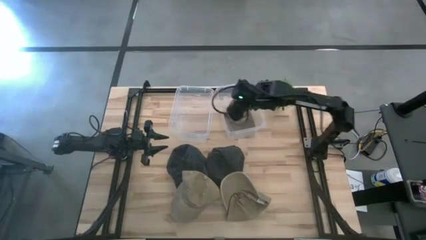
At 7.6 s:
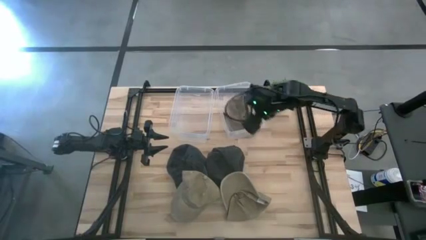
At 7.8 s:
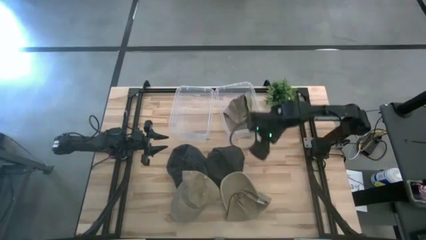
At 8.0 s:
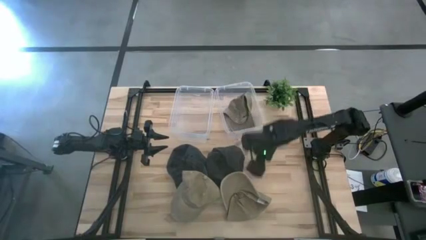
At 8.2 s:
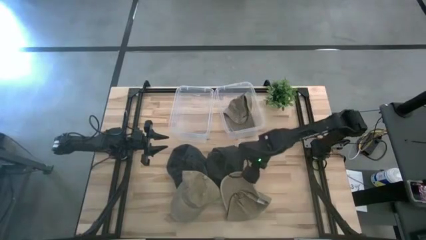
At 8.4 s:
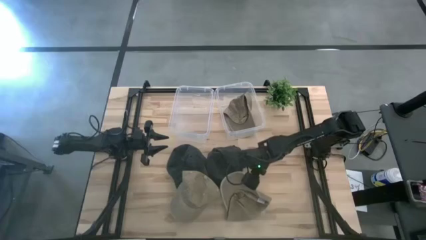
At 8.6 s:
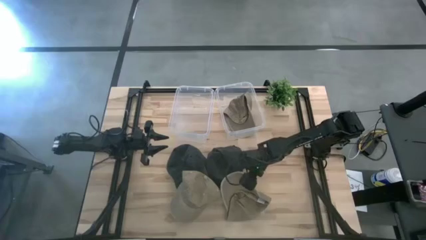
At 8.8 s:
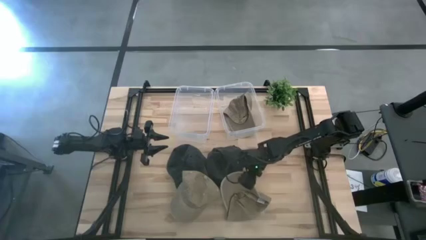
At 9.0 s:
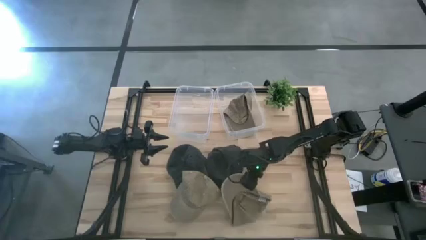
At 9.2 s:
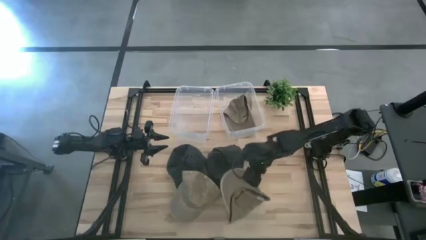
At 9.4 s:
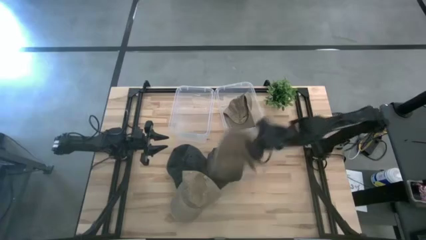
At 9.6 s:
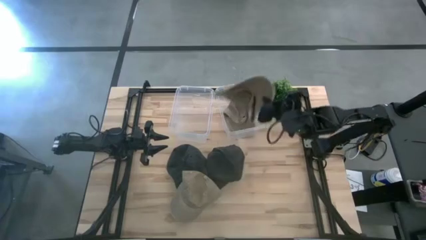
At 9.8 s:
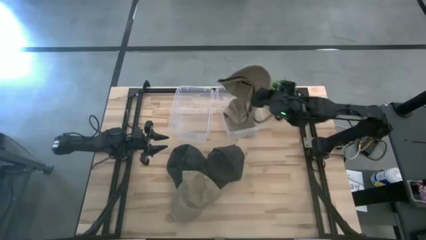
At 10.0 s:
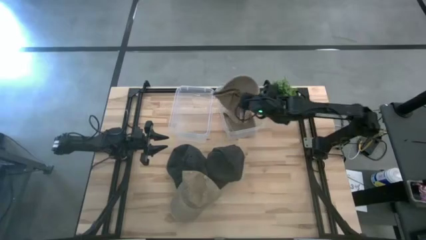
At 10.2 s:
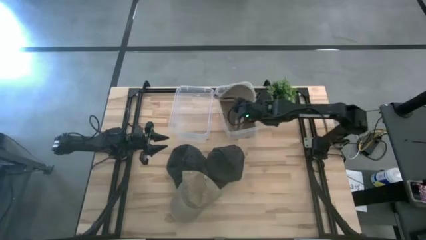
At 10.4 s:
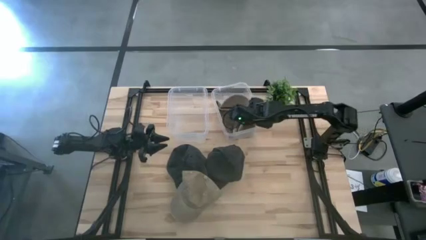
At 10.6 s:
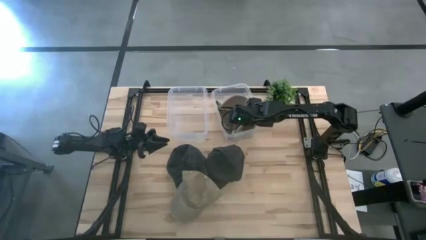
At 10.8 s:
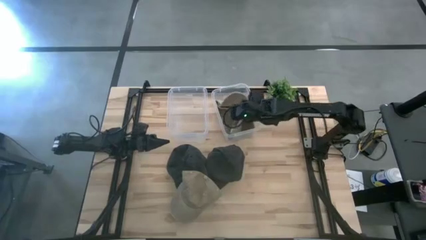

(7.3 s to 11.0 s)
Task: Pick & Place hat
Put the right brown cap into the right transparent bin

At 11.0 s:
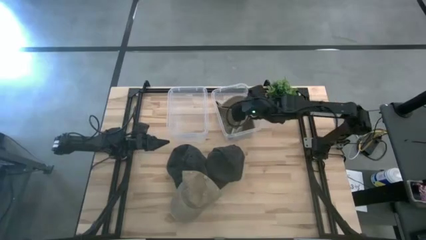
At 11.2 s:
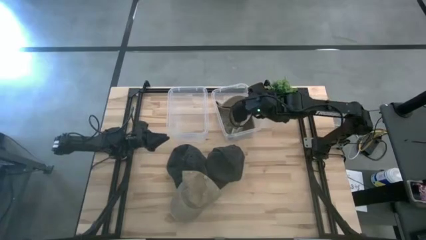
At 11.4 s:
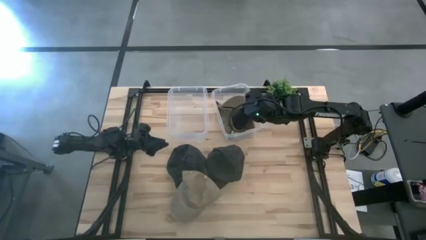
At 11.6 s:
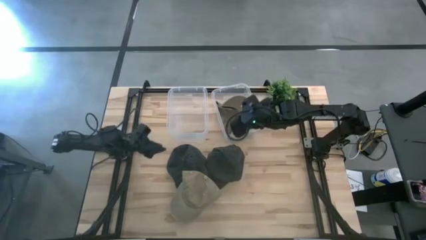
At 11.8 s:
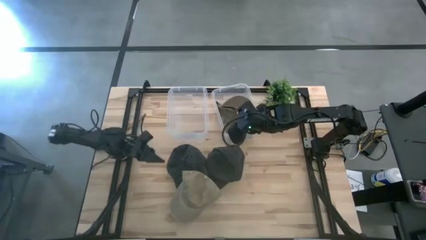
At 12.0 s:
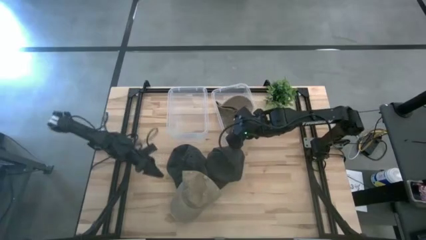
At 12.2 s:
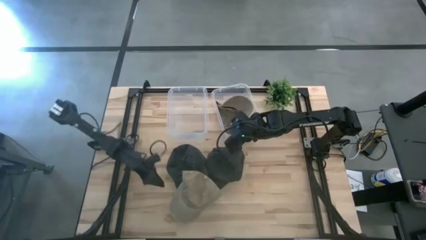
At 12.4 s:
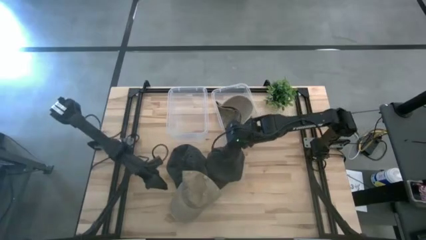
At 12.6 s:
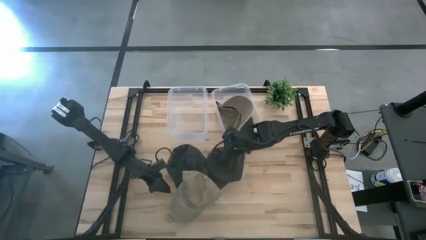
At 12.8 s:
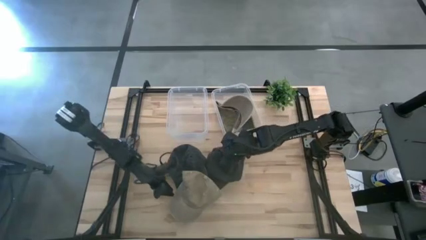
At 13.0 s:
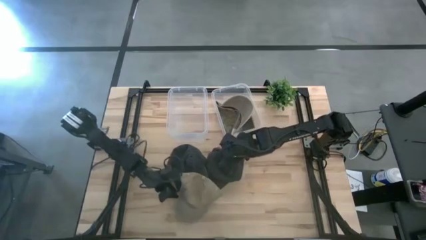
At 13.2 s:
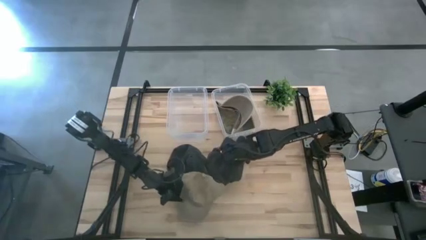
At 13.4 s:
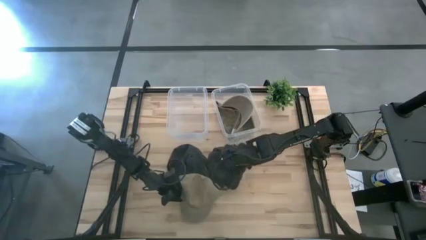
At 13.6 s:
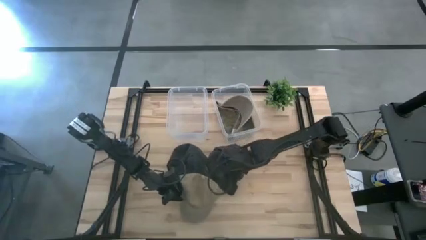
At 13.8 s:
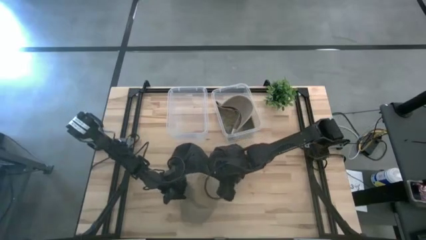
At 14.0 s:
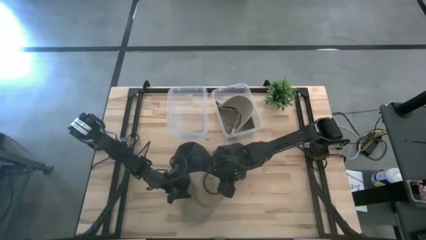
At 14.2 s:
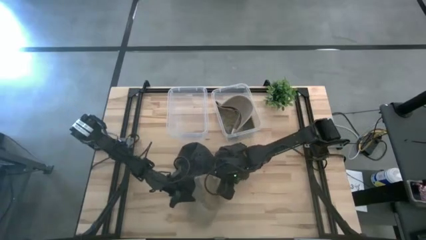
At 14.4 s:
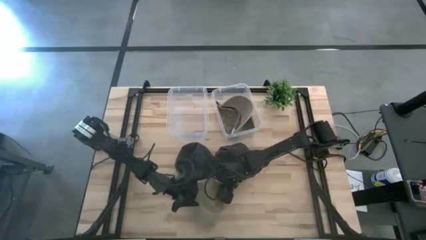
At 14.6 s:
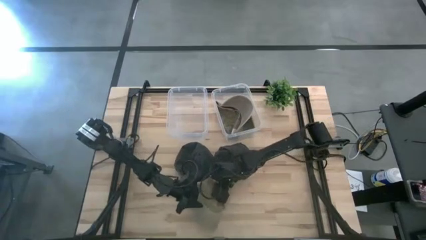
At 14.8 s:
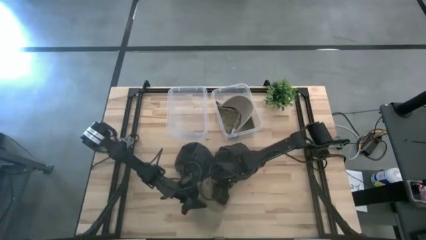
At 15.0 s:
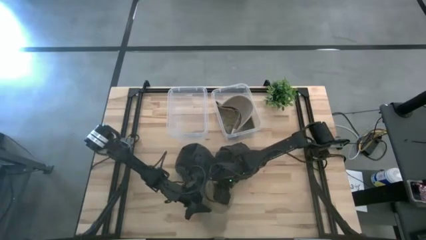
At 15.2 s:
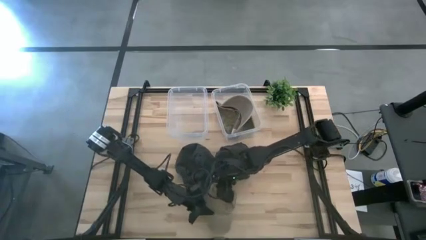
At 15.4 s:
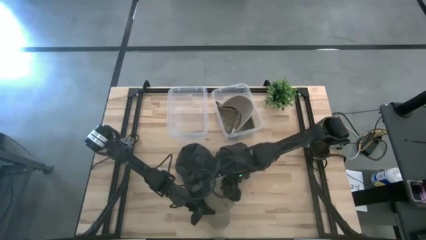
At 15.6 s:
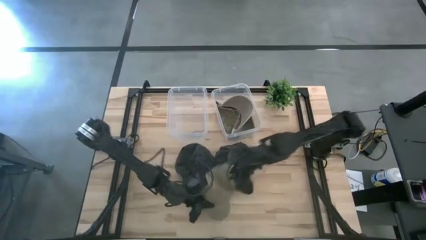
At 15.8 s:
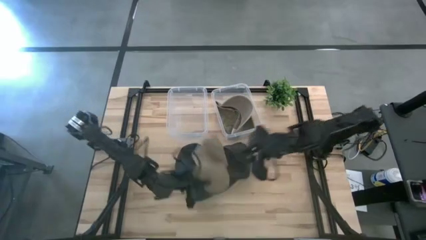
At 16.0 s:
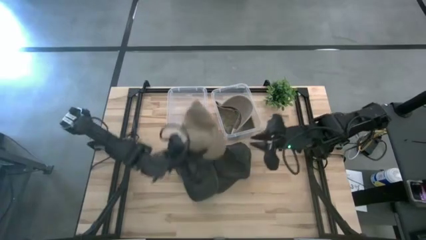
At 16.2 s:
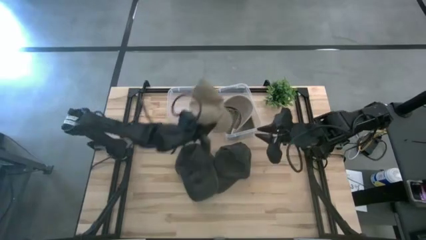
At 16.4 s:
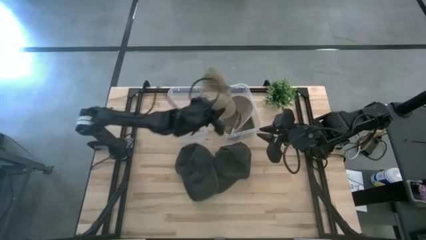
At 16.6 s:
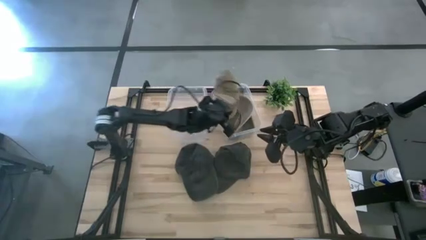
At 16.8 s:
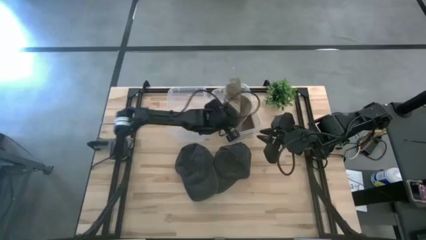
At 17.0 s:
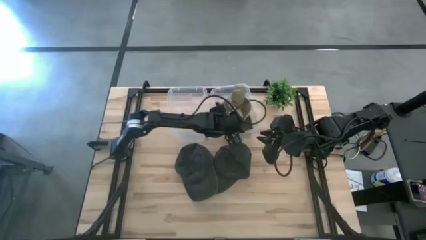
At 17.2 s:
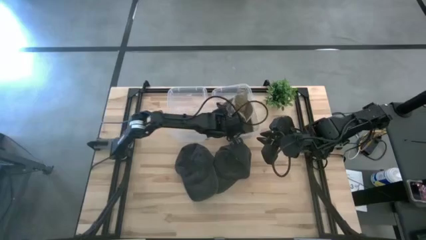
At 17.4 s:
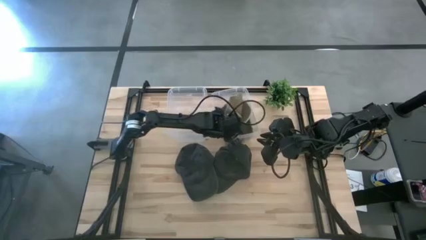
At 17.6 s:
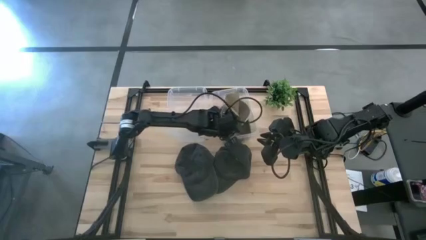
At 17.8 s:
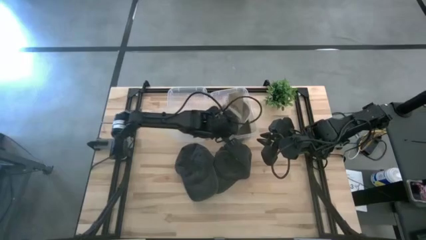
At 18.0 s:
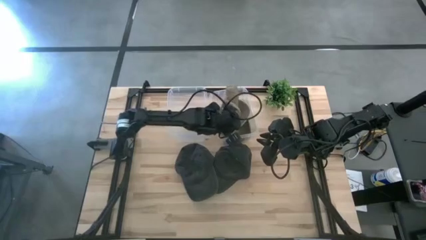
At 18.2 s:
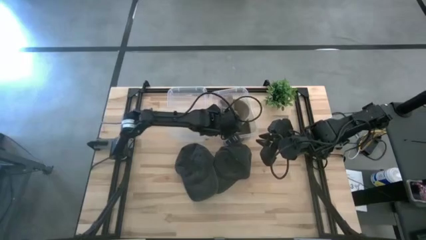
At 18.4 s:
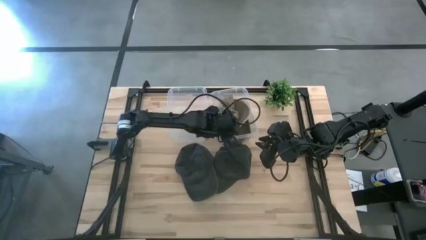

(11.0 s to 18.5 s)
Put the brown cap into the right transparent bin

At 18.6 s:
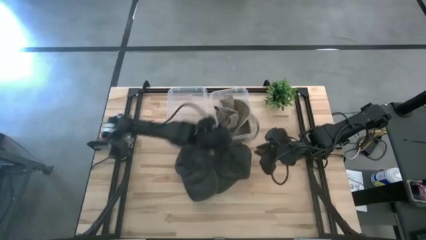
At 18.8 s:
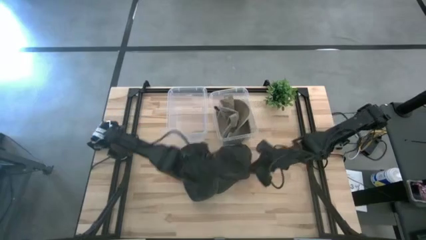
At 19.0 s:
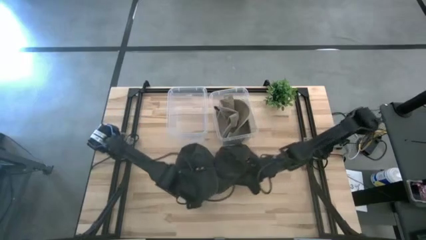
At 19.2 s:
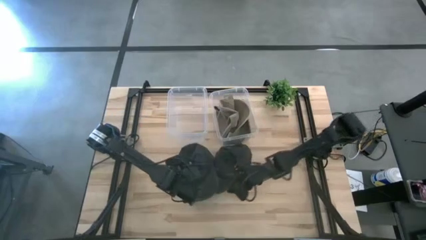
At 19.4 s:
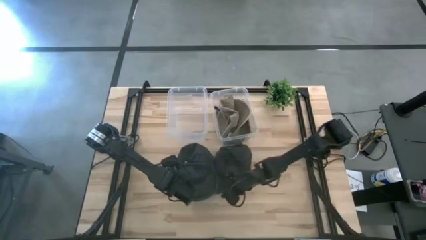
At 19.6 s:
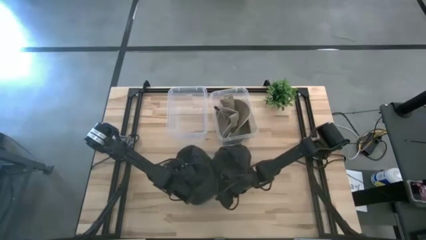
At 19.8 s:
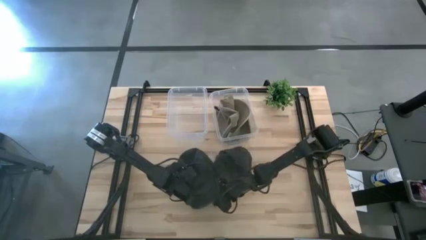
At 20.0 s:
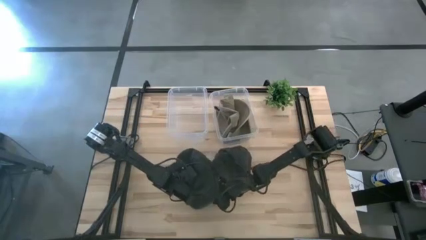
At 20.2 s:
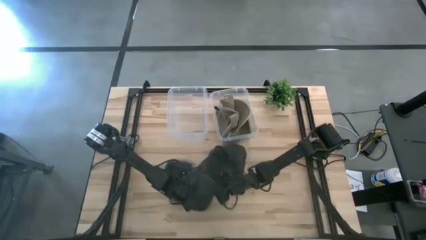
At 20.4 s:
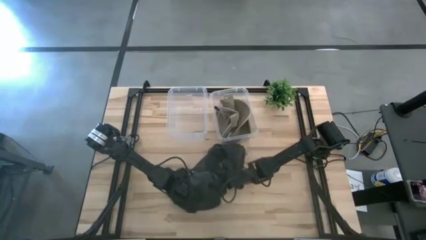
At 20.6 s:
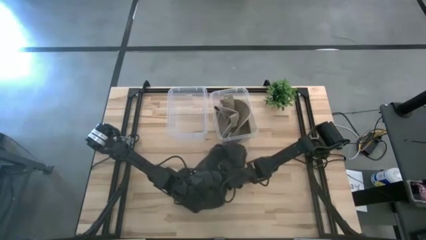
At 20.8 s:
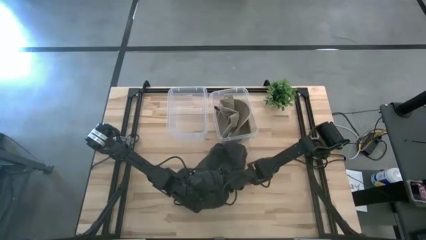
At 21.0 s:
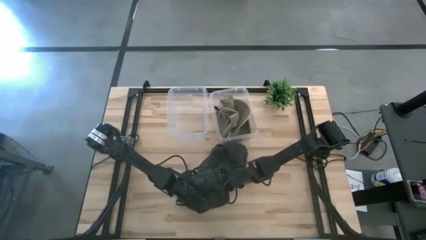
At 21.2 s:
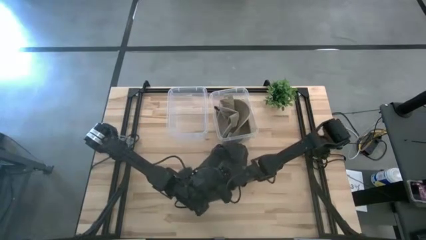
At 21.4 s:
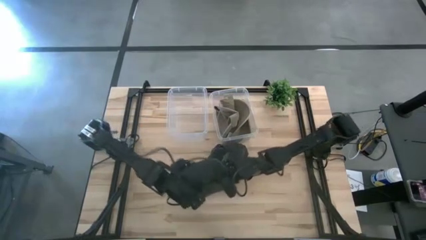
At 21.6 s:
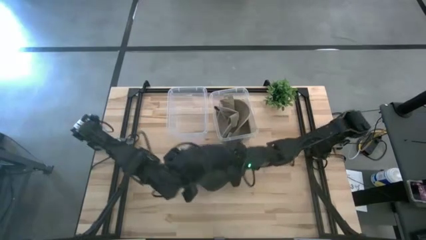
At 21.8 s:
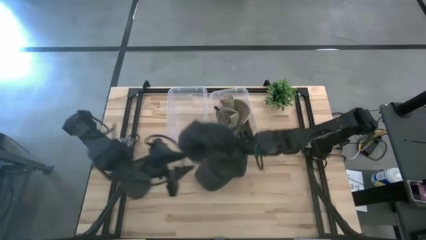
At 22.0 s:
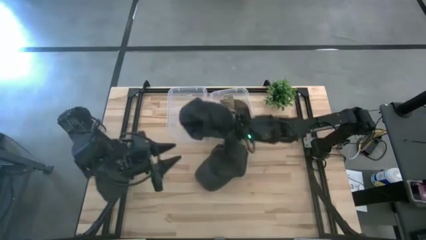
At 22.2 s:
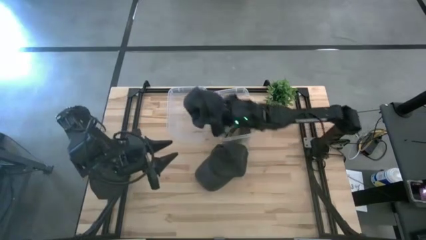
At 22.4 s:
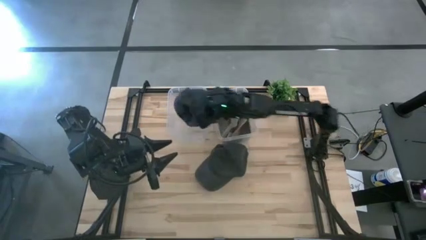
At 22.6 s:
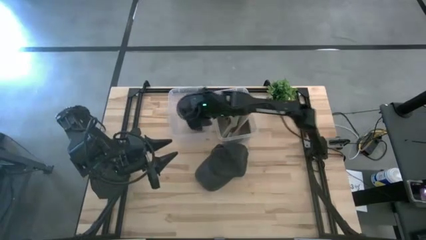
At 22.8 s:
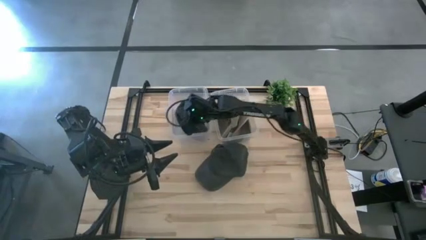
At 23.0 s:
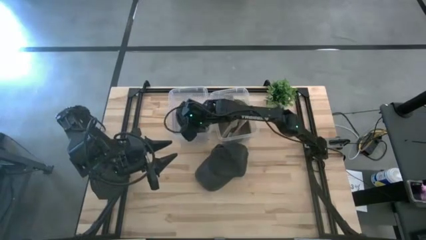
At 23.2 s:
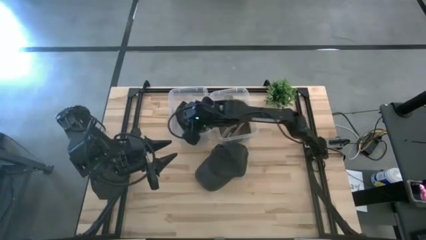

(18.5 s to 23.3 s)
Put the left black cap into the left transparent bin

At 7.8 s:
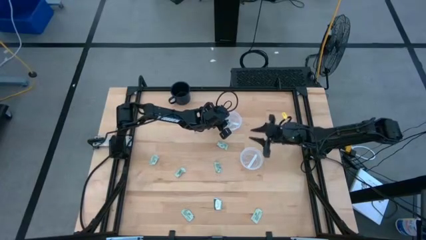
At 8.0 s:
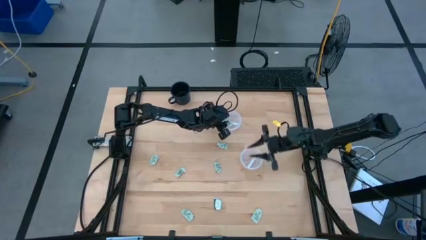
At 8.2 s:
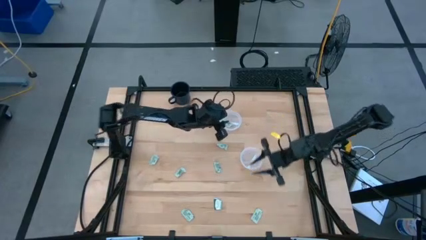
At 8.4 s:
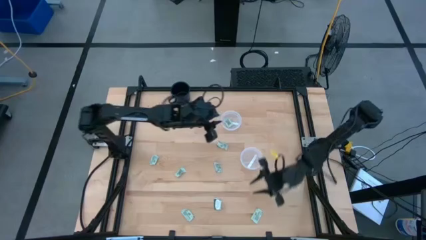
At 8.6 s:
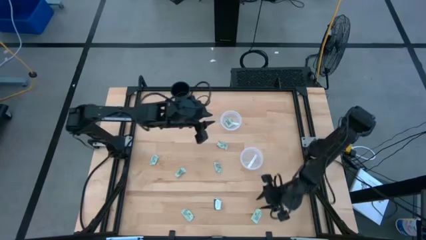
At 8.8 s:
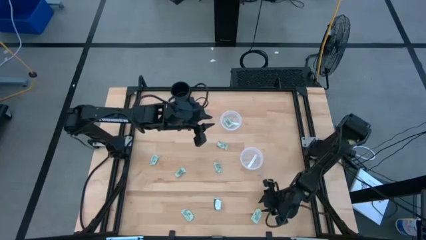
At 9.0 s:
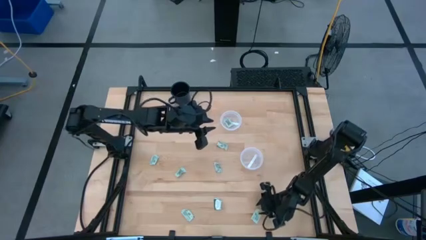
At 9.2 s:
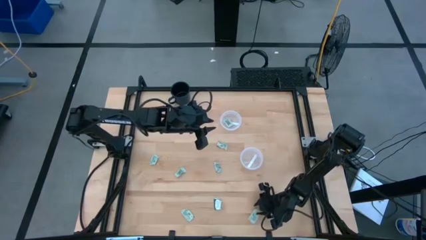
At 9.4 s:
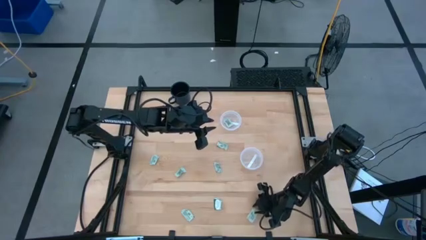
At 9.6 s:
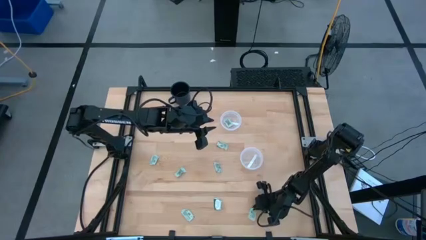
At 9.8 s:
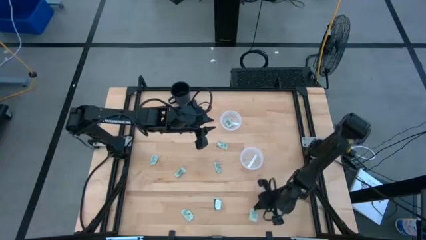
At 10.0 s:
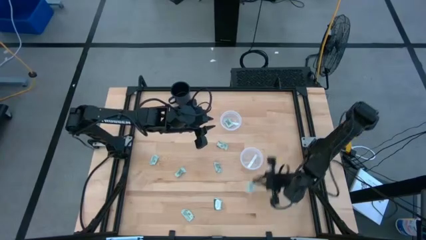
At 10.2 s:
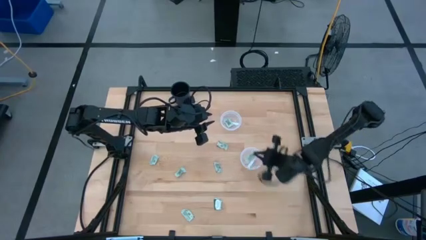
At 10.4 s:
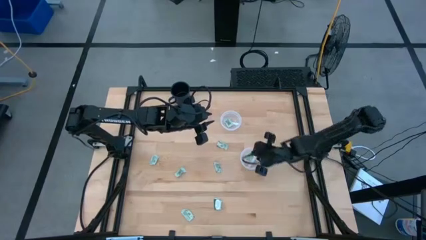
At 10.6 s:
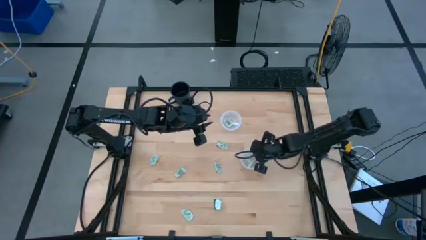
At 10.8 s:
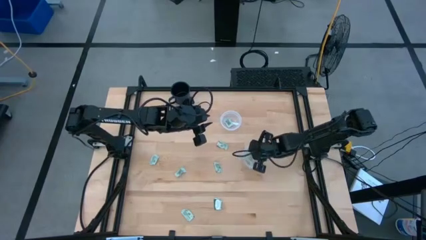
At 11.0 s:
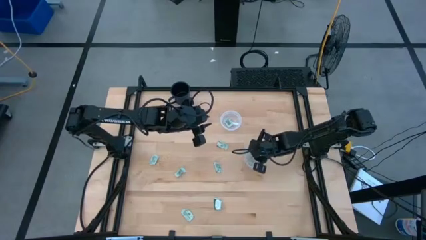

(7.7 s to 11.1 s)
Task: Pick and place items into bin
Put the stevia packet into the bottom transparent bin
